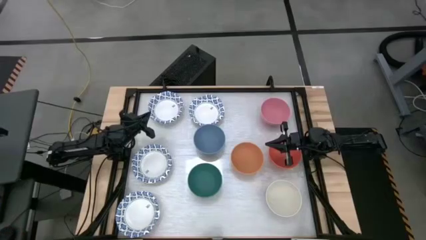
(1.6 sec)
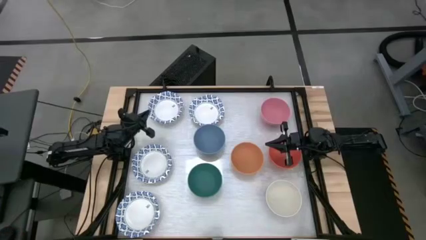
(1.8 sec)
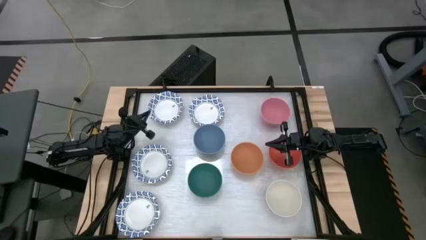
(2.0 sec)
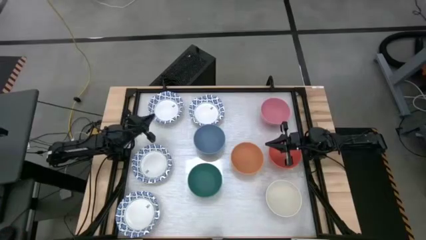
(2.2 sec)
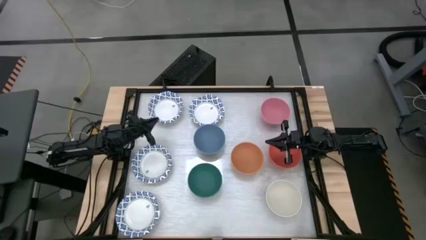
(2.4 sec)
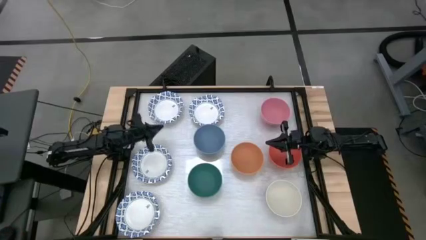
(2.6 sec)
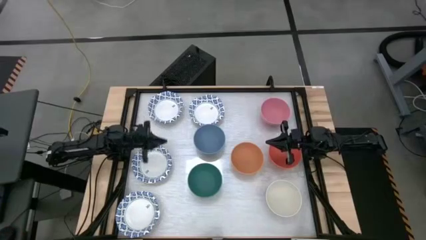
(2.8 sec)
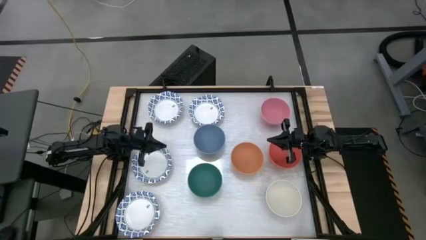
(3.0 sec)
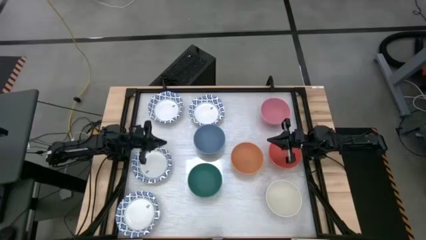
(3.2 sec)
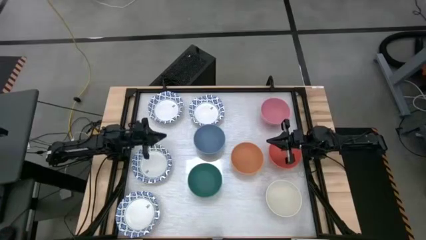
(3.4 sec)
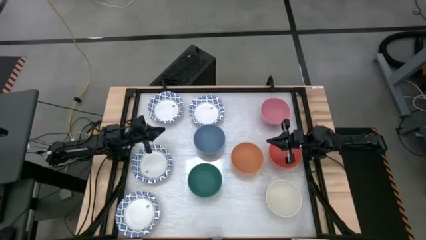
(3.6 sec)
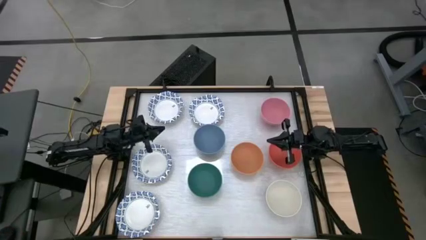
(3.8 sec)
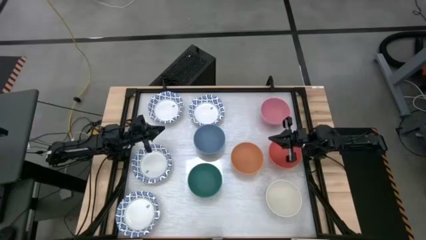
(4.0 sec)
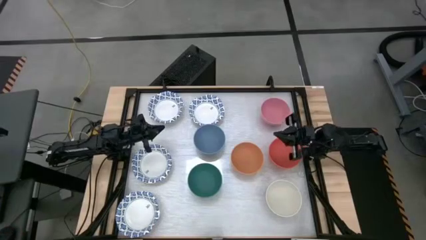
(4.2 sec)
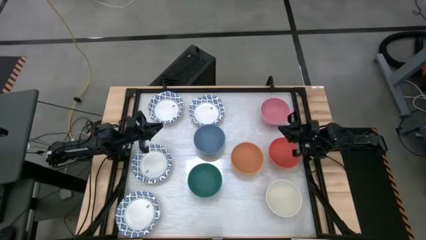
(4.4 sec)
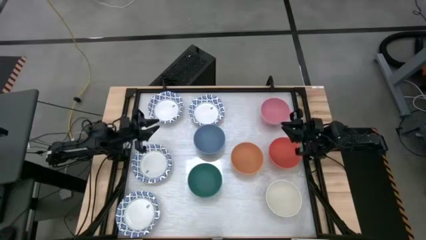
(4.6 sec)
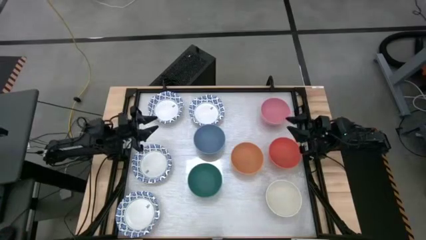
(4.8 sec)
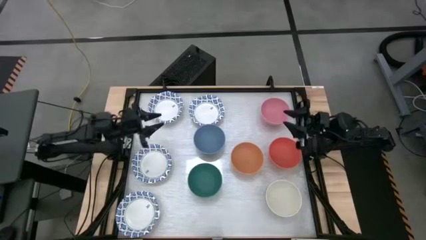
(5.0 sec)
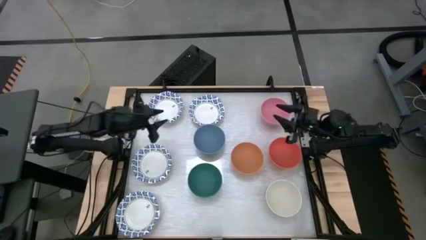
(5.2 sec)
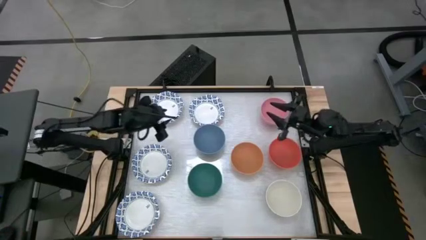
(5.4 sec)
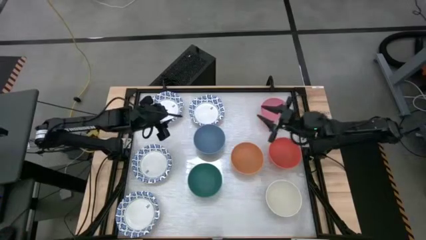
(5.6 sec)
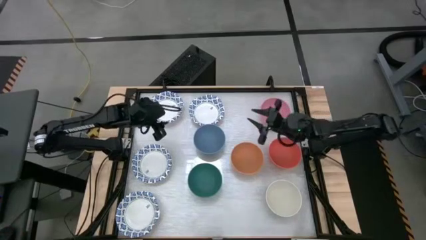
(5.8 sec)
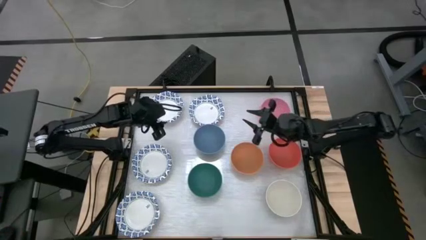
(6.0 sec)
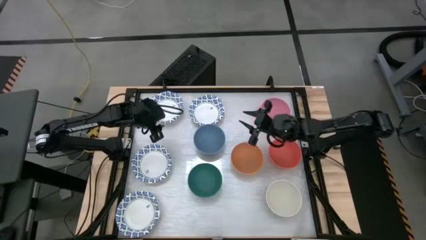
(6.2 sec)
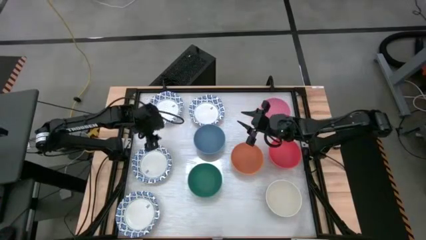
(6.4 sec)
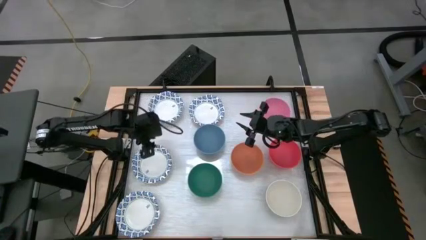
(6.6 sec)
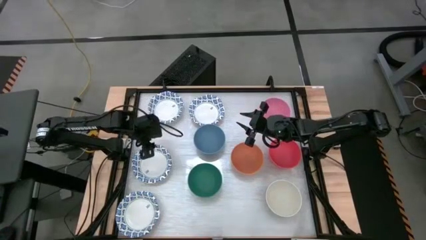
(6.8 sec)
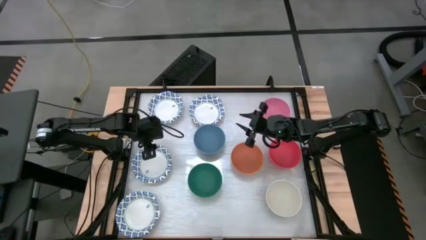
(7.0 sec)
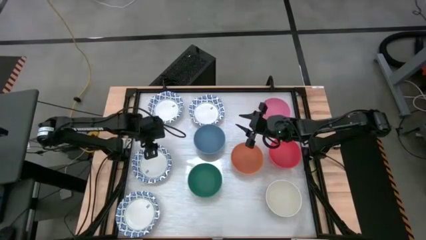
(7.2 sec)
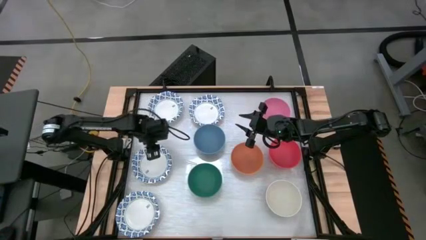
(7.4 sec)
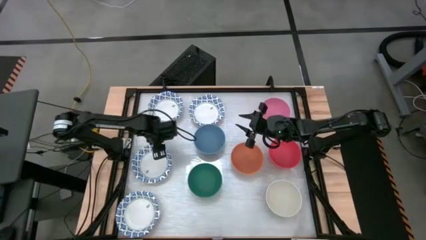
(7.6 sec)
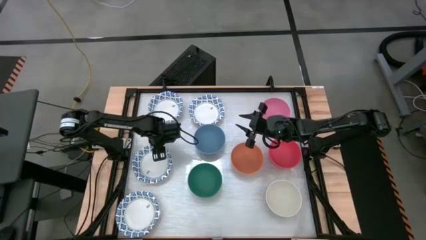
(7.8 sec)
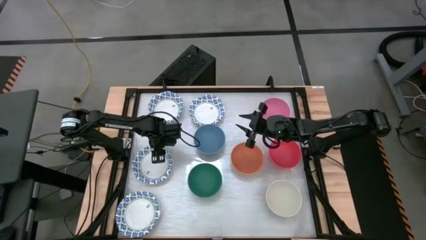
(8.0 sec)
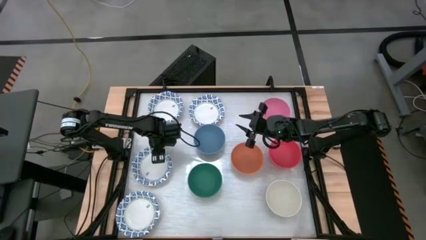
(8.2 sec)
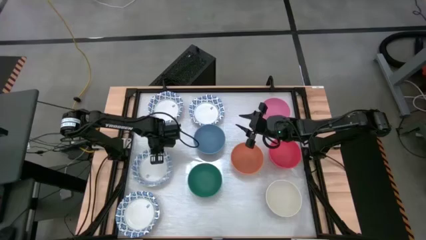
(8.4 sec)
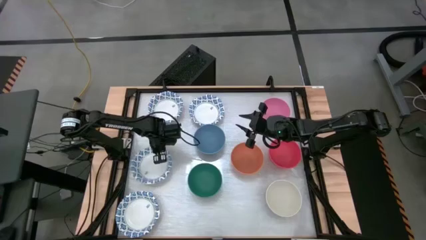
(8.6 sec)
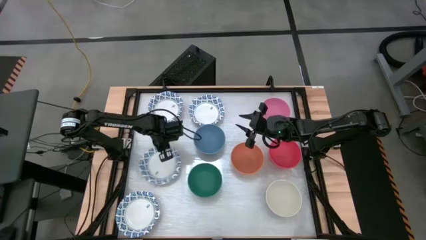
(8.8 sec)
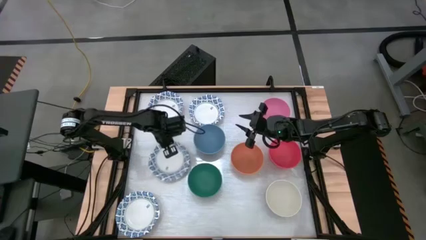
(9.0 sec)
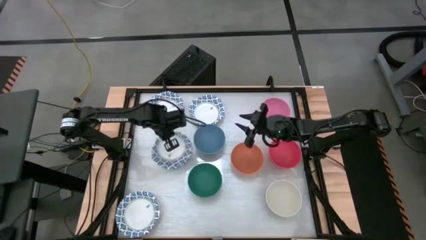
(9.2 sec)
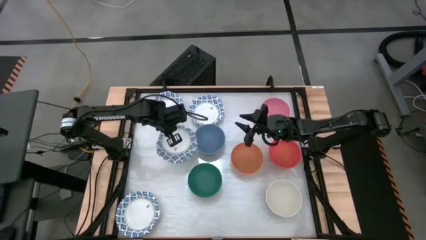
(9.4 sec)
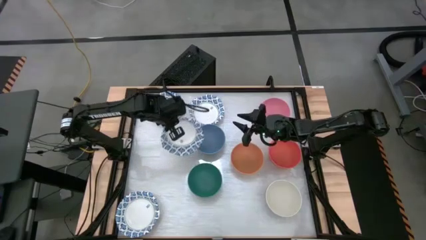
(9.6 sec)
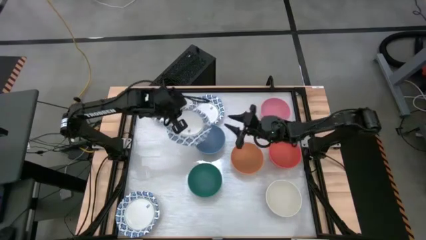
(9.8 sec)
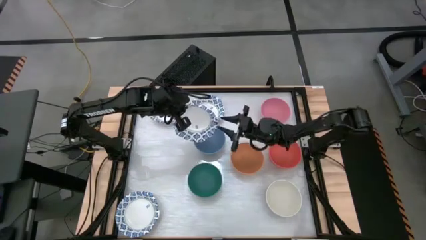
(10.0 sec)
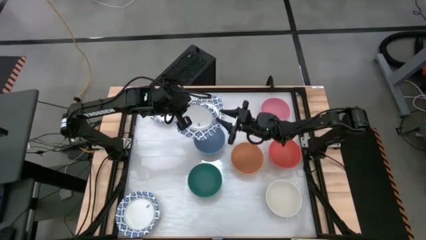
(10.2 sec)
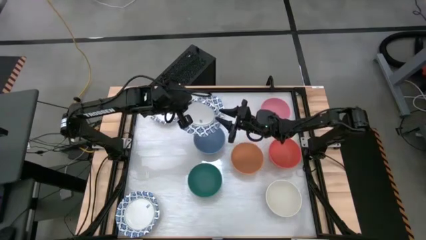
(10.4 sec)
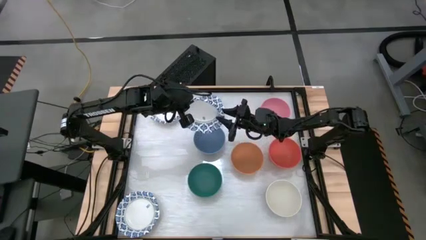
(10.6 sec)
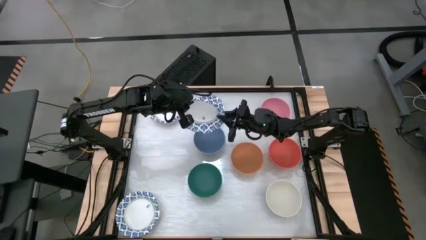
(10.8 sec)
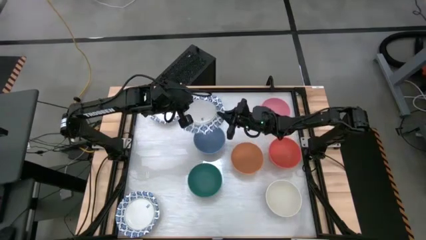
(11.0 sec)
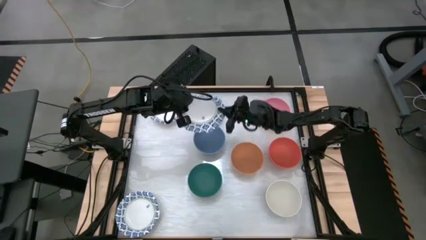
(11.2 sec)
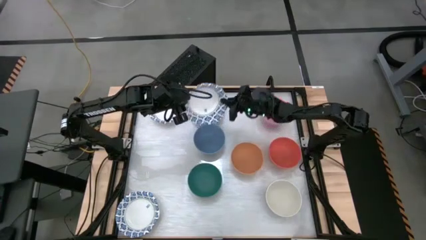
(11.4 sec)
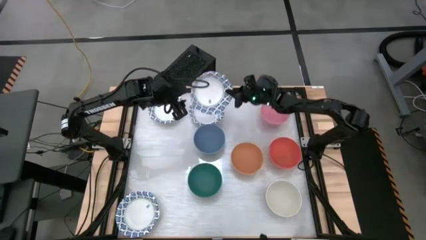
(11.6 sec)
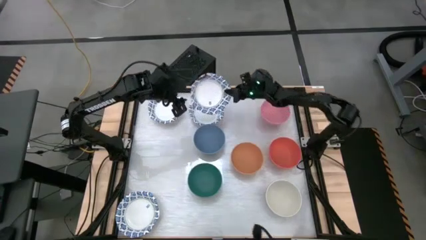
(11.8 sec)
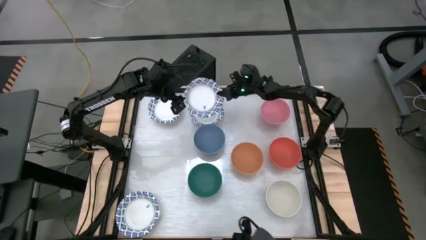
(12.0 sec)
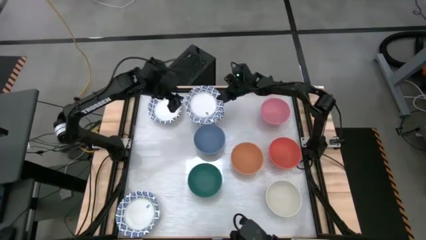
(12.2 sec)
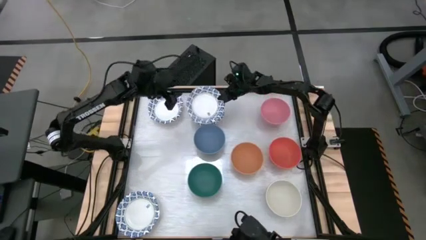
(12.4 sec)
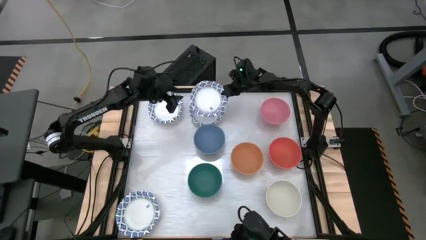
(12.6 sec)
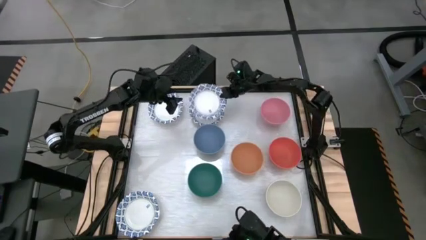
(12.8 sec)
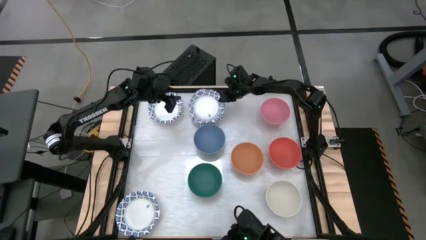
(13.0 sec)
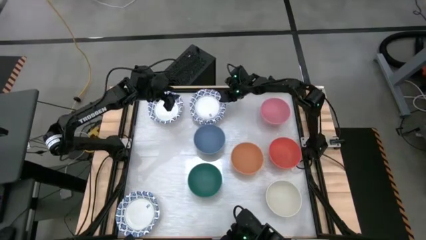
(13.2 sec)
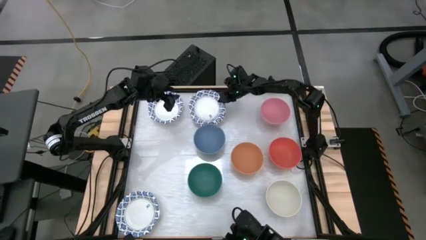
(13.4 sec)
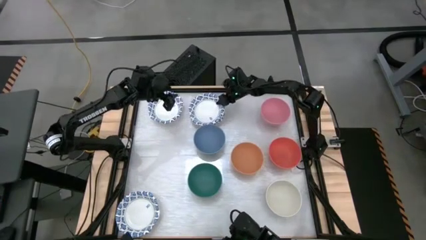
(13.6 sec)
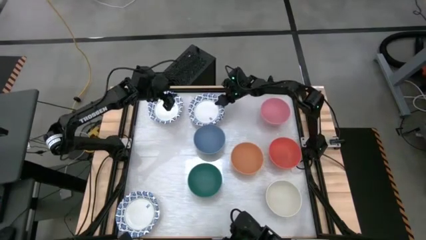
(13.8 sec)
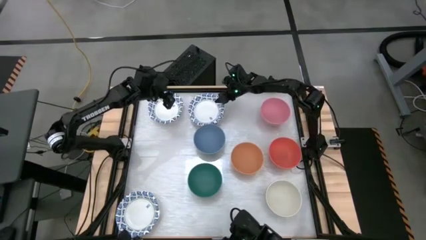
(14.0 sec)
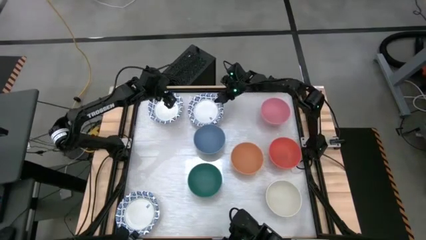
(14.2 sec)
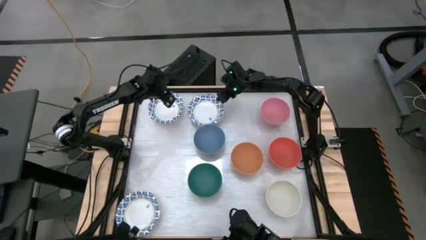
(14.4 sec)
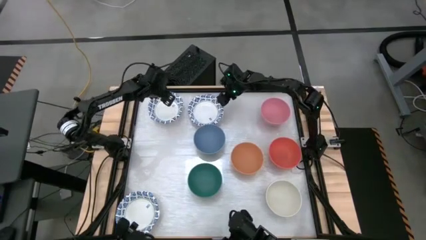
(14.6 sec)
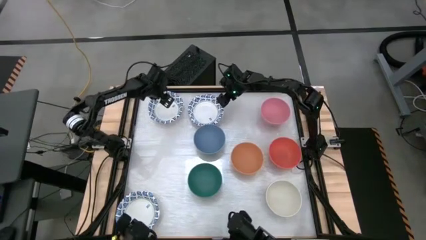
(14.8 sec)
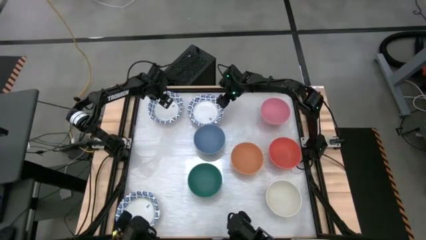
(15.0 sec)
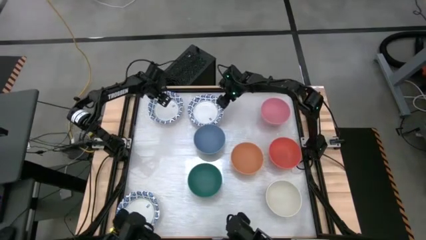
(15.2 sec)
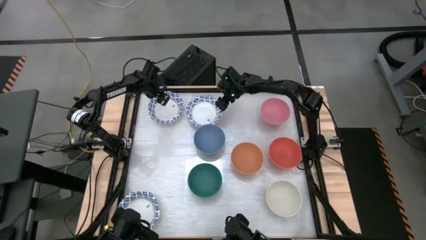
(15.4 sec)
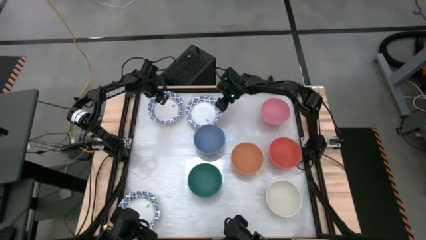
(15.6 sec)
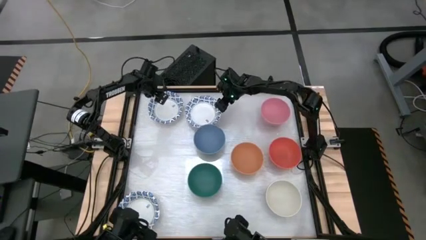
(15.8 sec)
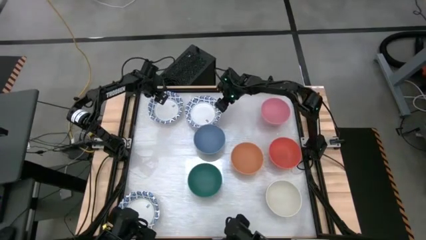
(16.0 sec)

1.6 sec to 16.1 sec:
Stack the white bowl on top of the other white bowl
